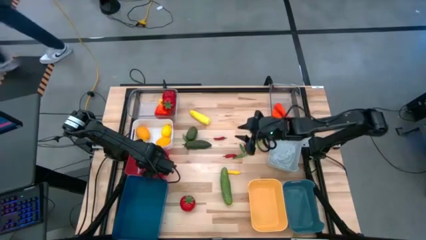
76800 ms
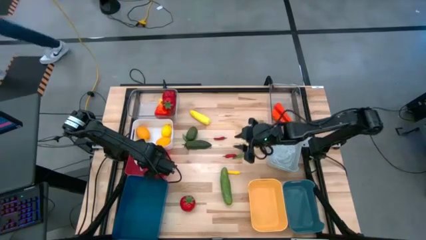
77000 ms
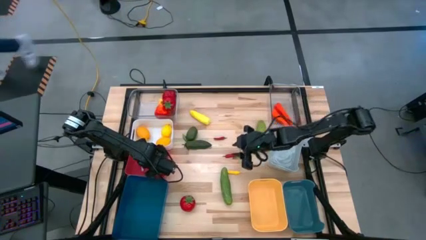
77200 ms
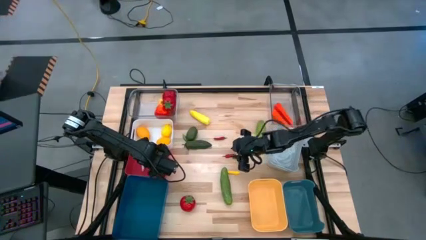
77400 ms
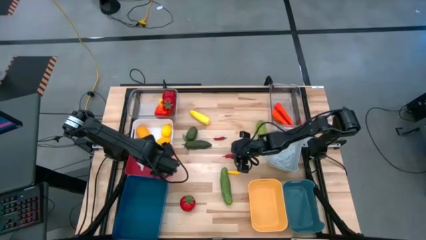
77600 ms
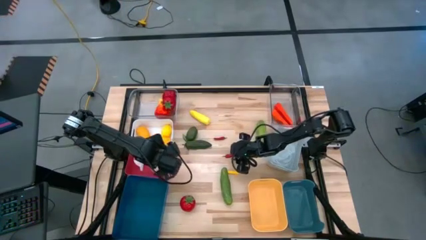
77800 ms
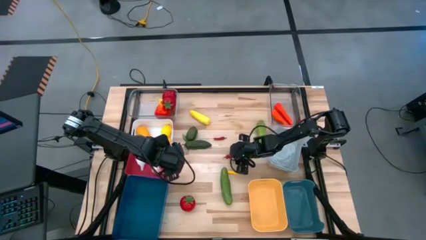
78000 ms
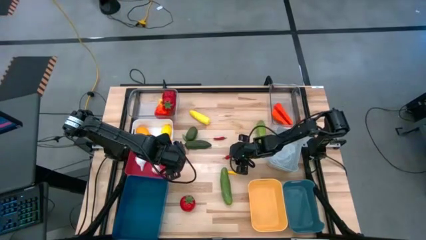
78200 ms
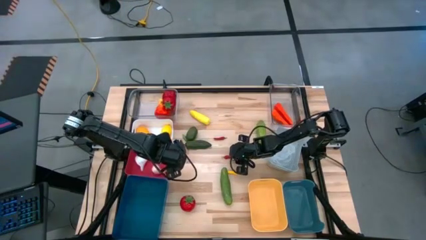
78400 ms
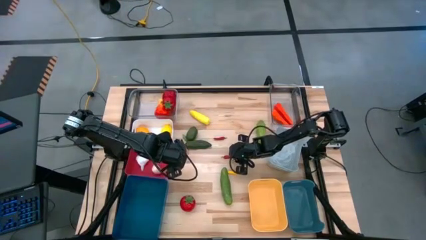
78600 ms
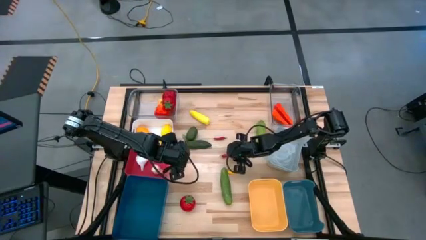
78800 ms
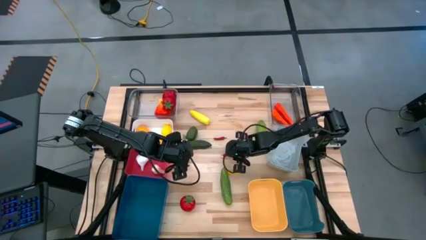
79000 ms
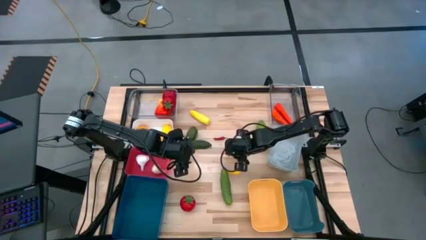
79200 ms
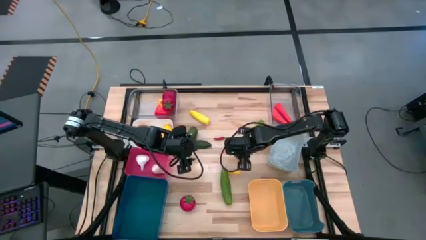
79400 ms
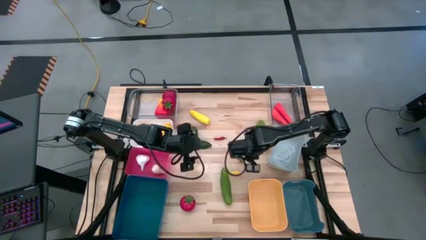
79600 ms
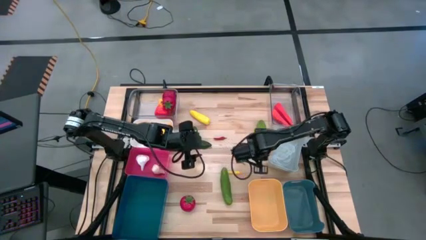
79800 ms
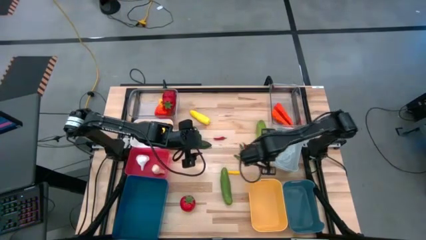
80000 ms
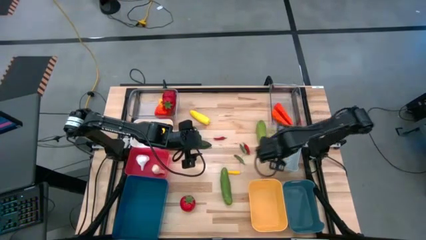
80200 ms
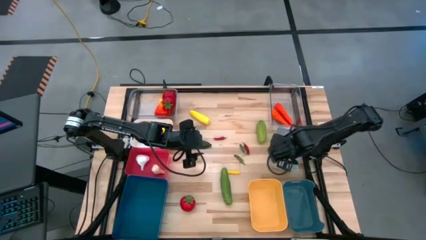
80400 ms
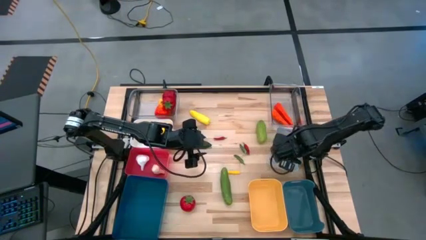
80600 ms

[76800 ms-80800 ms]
Task: Sort produce into baskets
Put the bottom left red chili into the gray bin

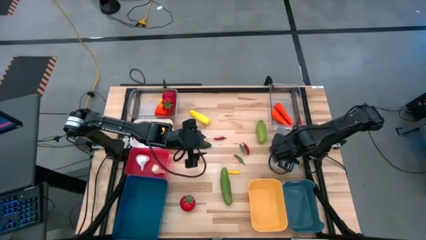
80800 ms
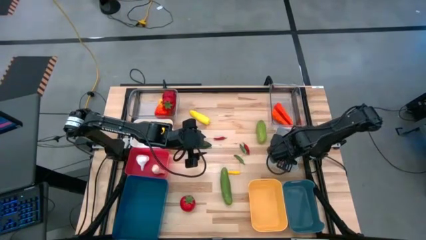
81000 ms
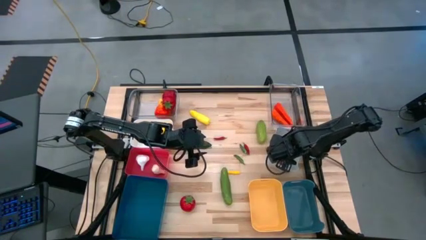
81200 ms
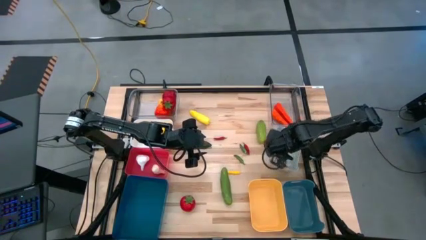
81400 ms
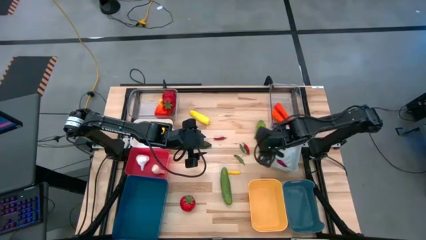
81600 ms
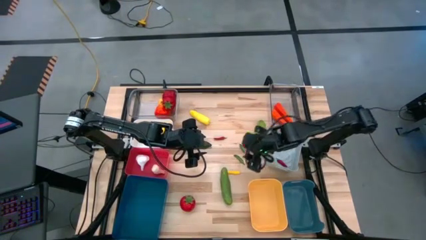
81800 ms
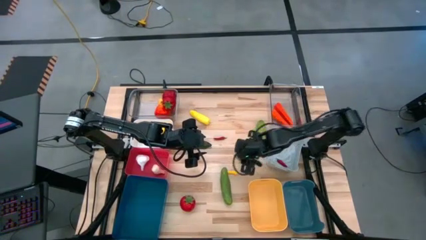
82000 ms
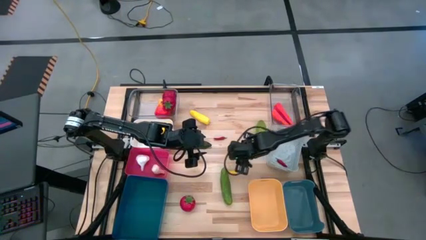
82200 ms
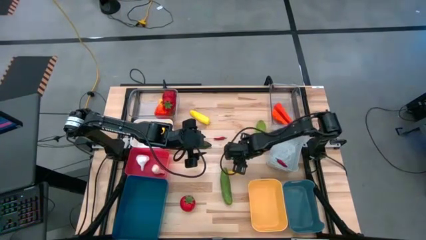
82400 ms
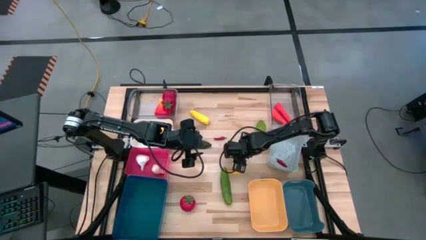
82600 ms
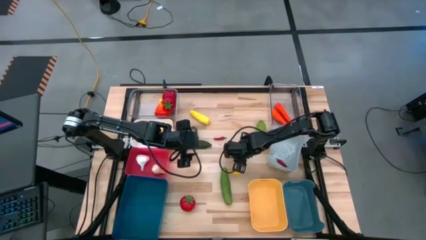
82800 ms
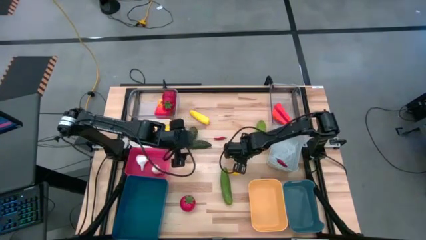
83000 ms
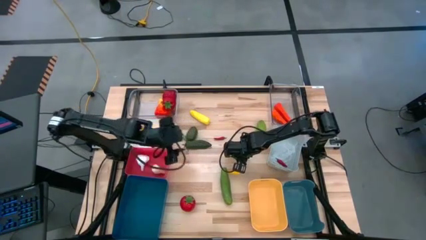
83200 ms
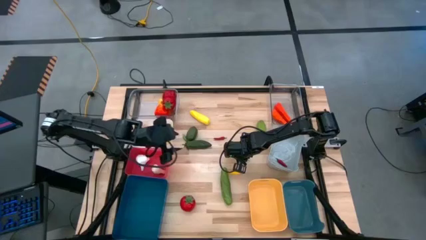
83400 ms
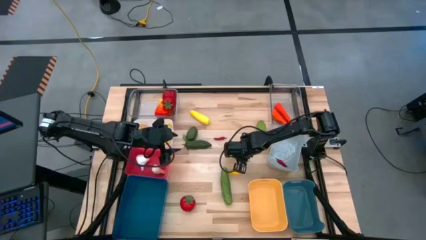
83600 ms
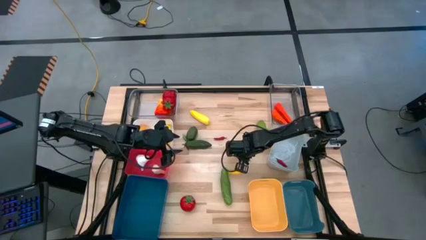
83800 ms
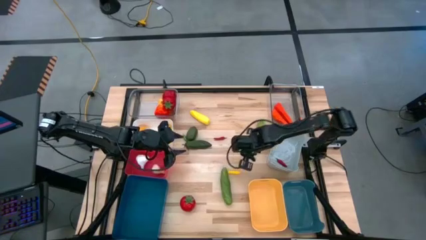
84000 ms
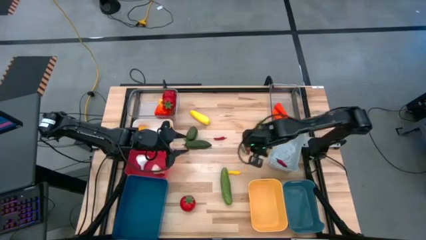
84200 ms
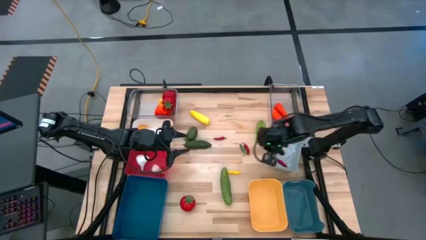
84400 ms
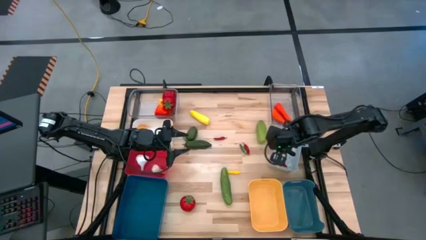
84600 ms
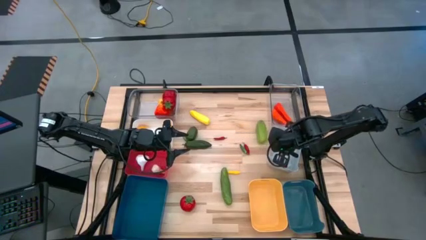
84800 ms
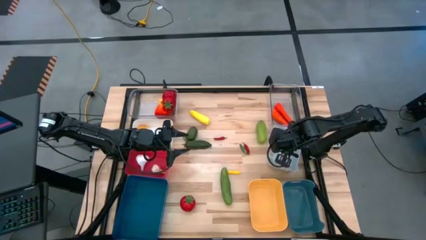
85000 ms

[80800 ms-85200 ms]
Put the bottom right green chili into the gray bin

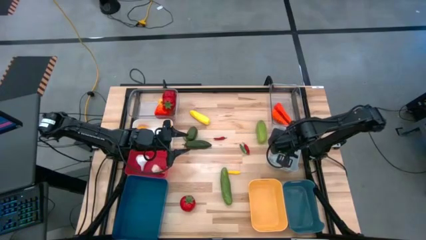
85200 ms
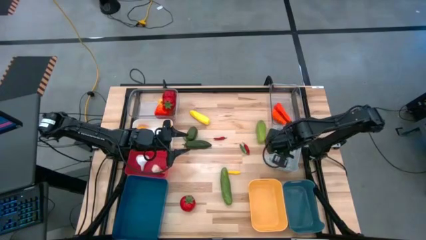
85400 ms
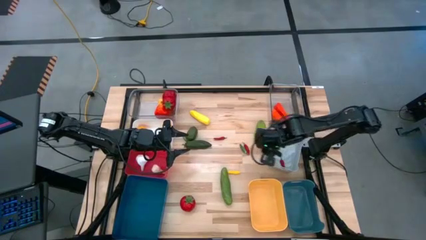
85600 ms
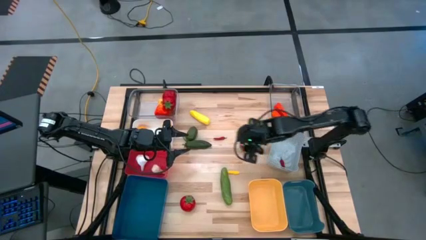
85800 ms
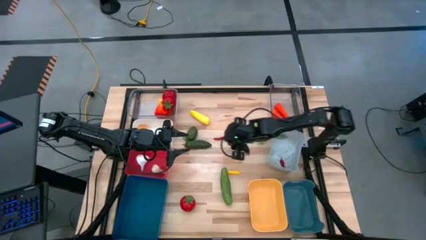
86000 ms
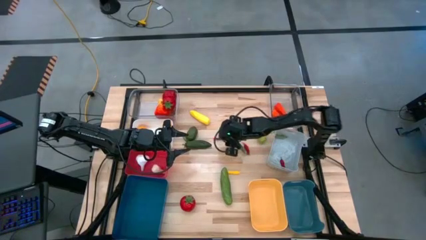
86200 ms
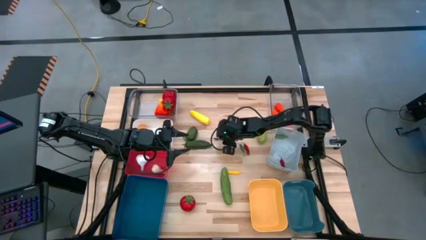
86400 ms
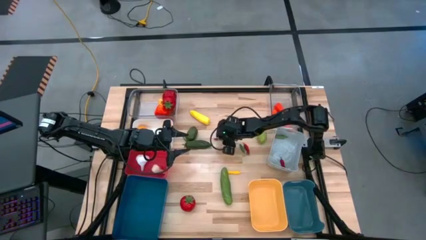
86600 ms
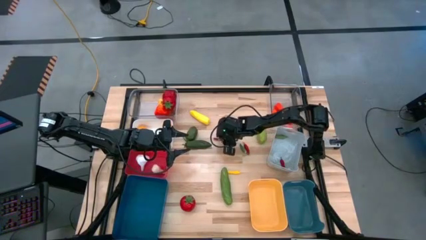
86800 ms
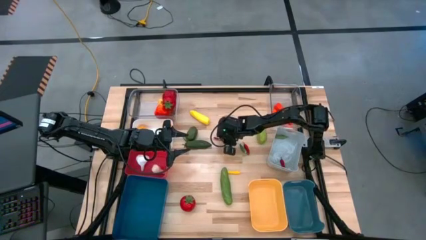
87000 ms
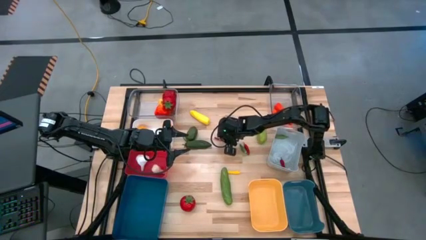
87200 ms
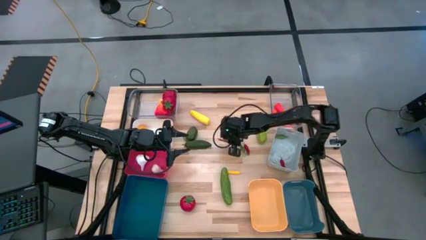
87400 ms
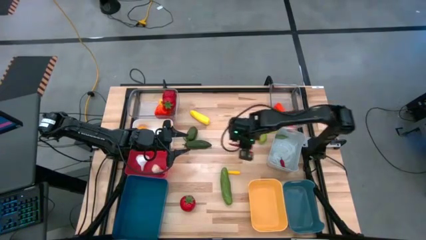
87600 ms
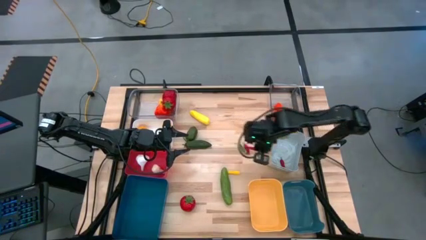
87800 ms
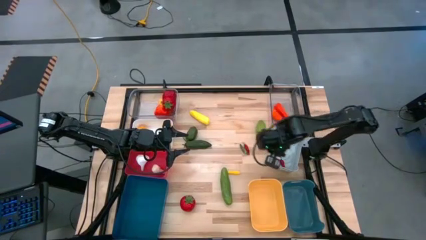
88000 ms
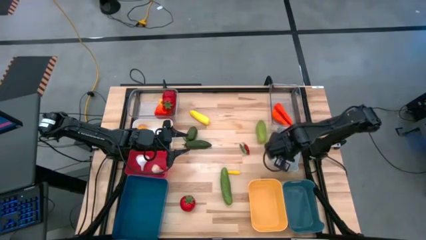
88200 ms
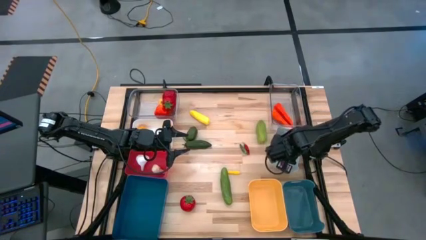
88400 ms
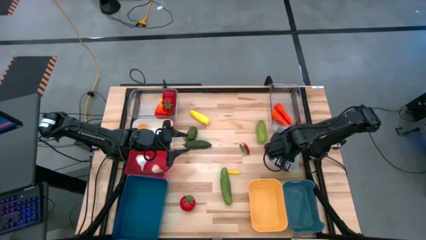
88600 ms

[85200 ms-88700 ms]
Put the left red chili into the gray bin

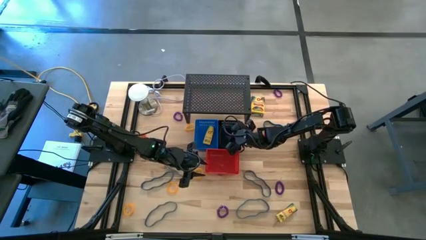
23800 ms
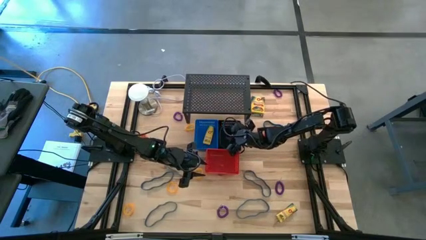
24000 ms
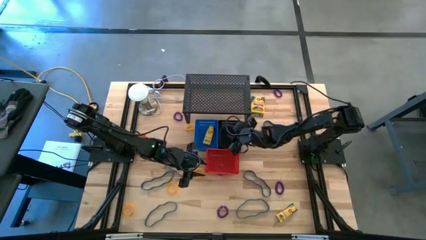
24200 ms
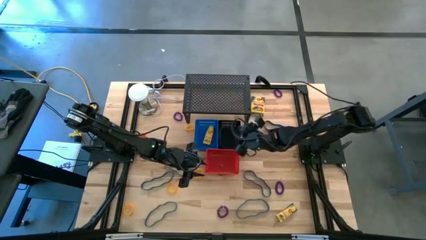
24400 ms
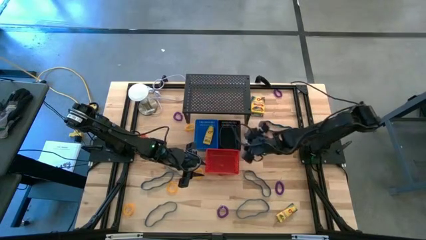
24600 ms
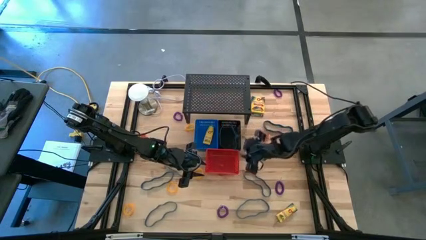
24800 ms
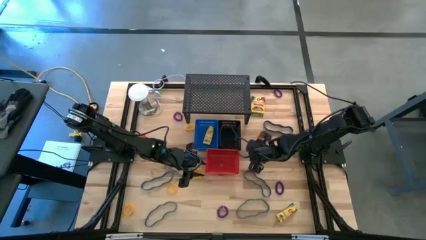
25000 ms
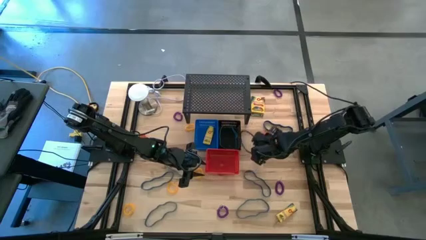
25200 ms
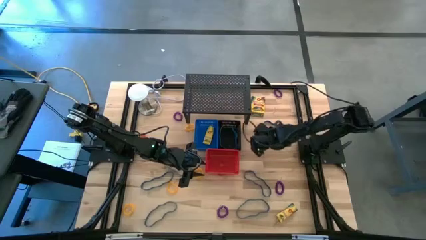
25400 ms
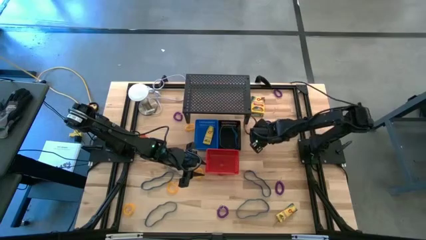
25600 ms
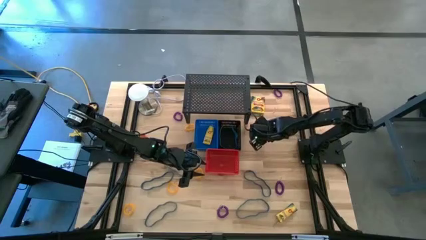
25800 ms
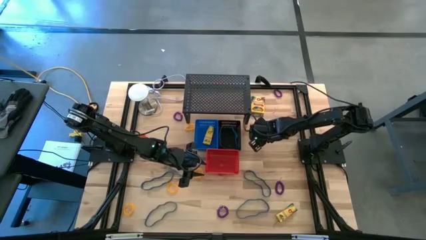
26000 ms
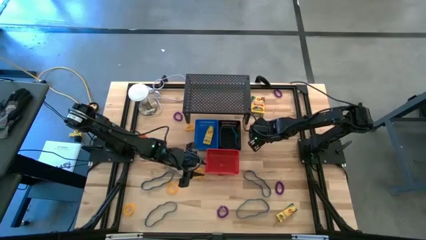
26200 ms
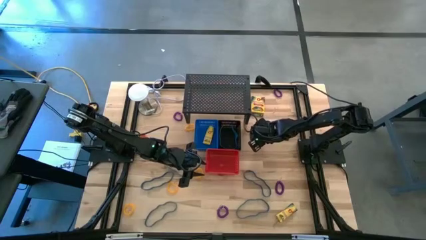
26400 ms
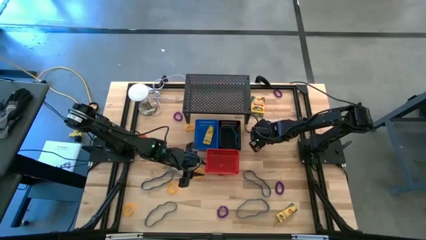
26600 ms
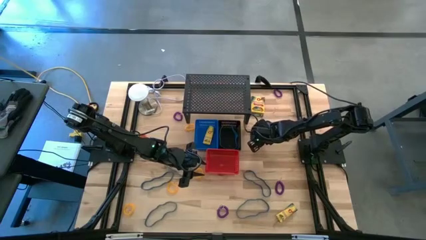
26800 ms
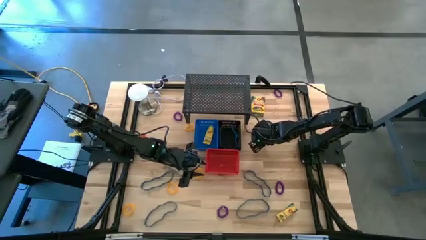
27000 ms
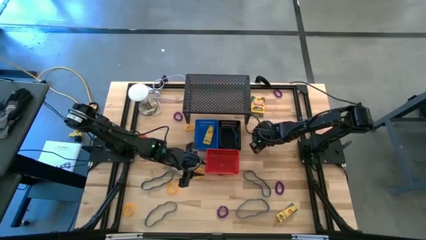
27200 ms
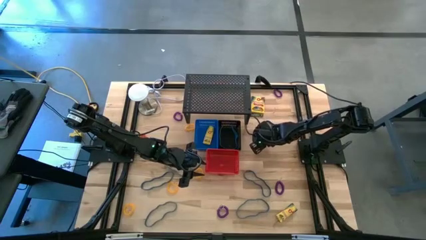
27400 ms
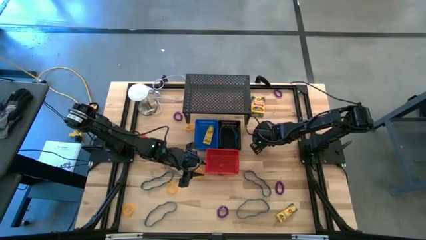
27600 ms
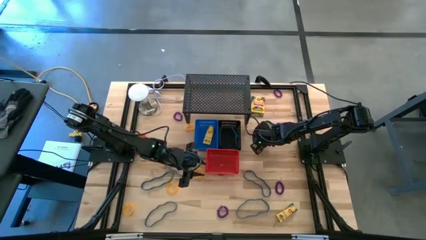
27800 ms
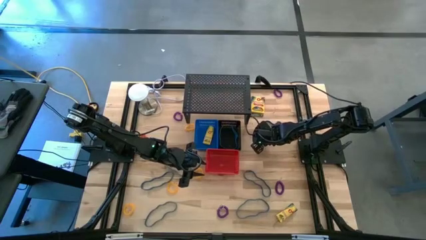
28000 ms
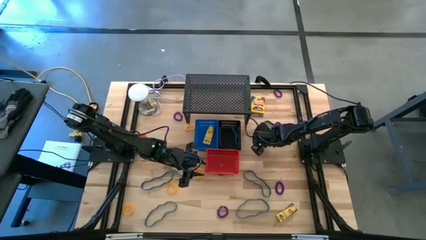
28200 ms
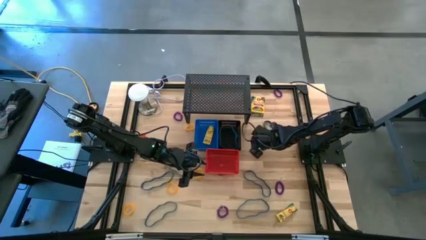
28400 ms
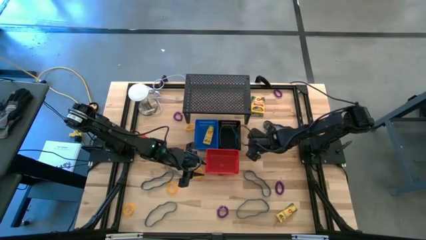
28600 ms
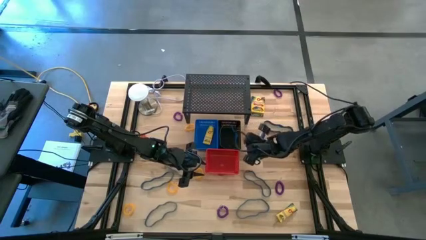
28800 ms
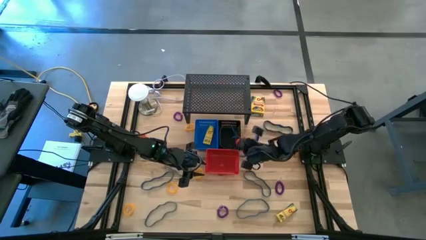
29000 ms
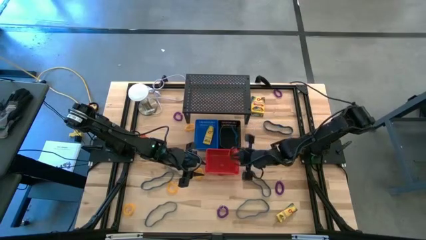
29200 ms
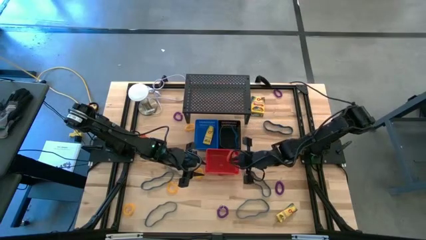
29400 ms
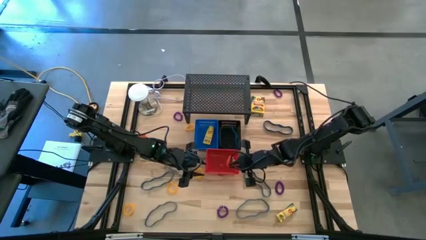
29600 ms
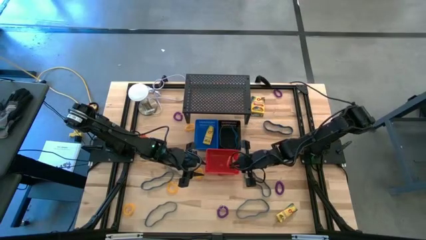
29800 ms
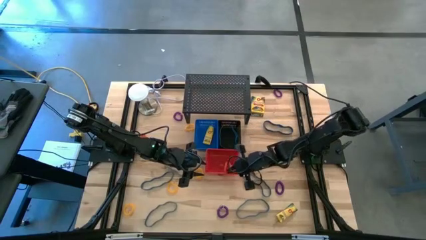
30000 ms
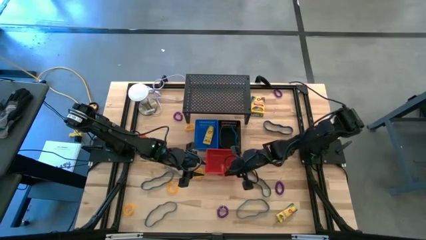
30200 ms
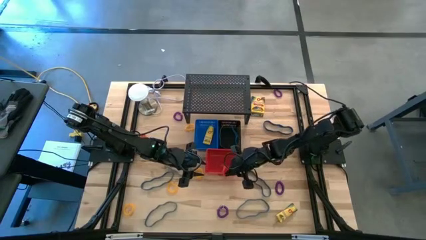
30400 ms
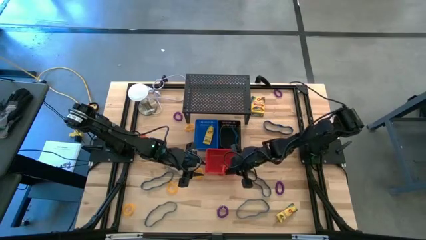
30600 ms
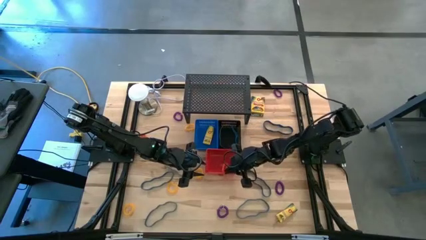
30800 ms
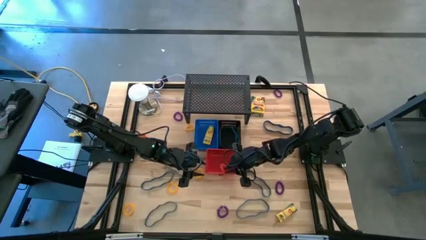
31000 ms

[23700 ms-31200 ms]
Task: Pick & Place Office Desk Supplies
Put the orange spring keychain into the red bin
